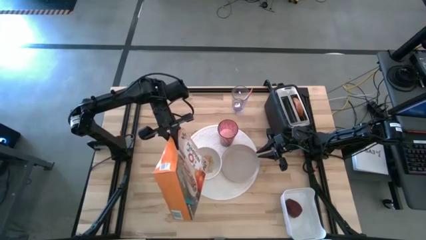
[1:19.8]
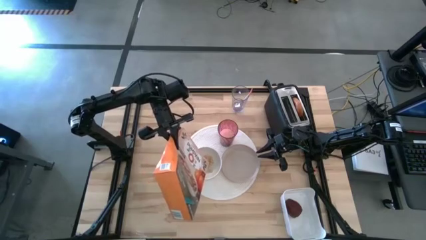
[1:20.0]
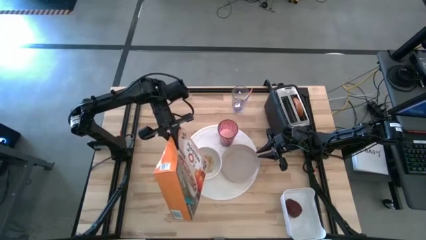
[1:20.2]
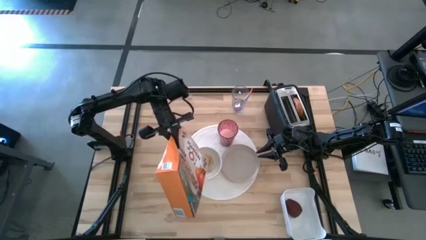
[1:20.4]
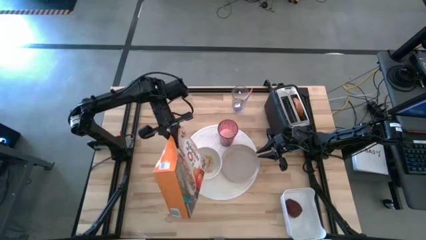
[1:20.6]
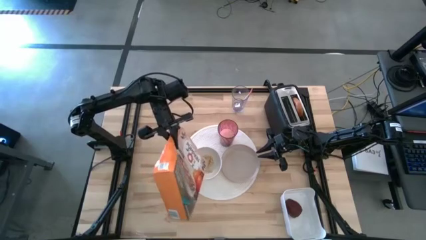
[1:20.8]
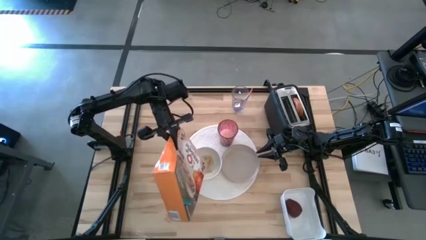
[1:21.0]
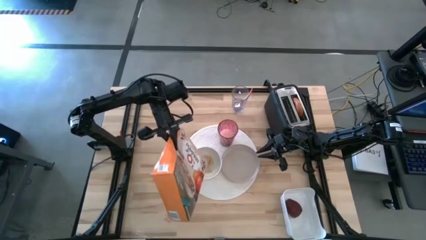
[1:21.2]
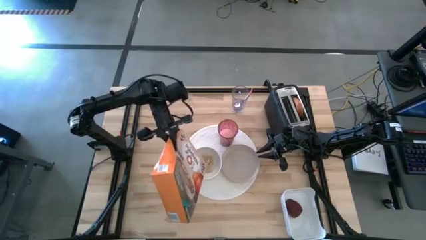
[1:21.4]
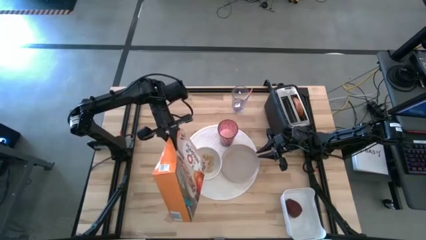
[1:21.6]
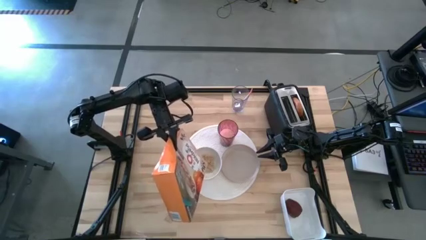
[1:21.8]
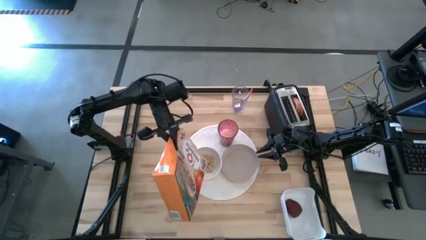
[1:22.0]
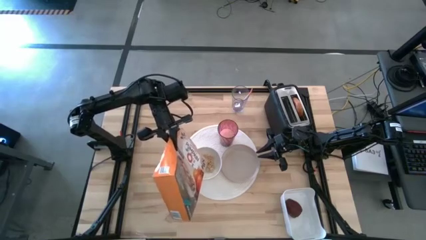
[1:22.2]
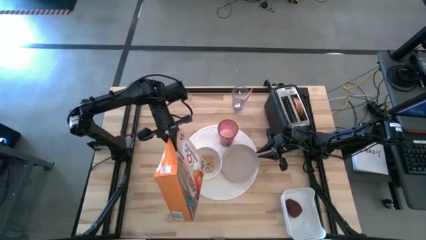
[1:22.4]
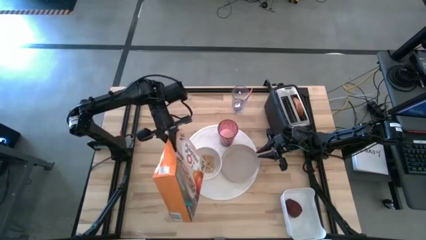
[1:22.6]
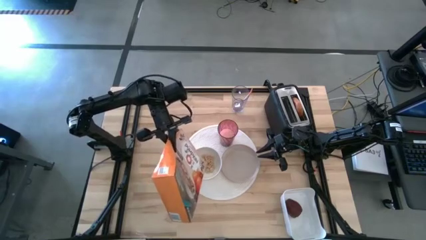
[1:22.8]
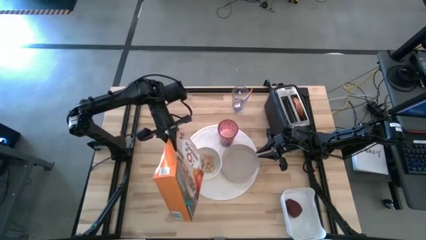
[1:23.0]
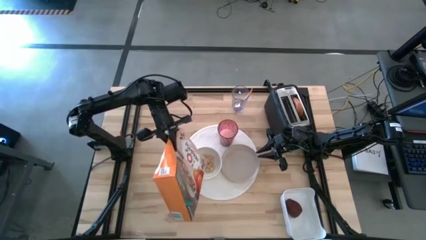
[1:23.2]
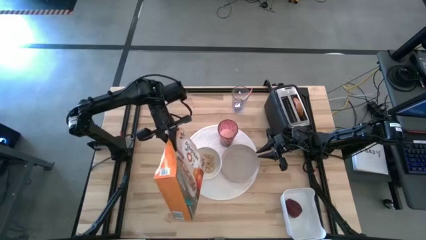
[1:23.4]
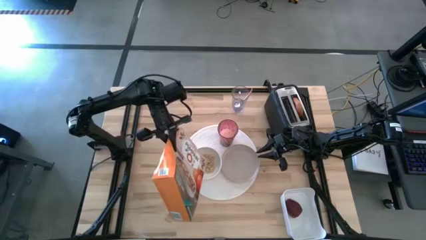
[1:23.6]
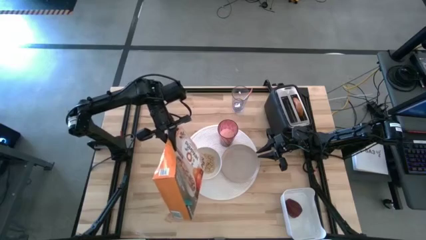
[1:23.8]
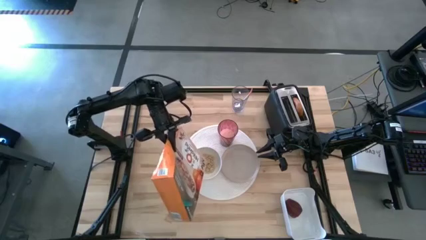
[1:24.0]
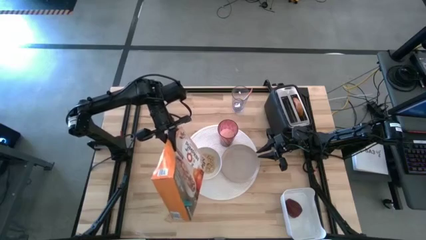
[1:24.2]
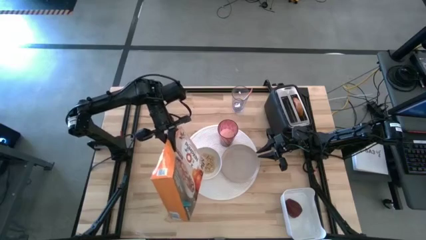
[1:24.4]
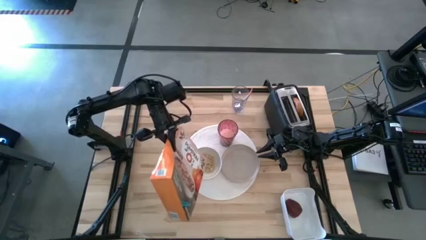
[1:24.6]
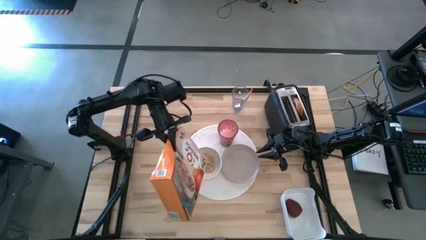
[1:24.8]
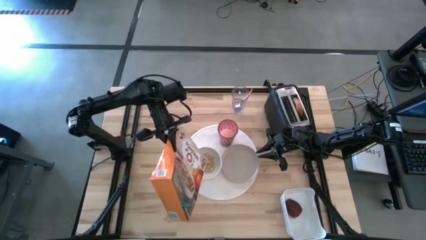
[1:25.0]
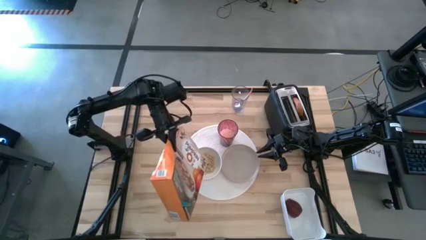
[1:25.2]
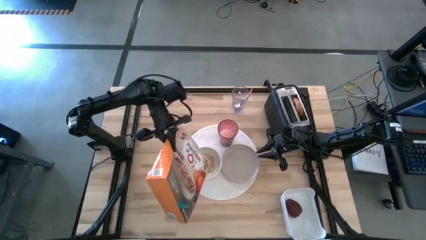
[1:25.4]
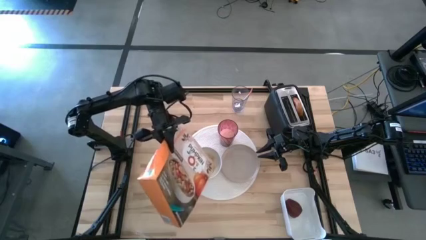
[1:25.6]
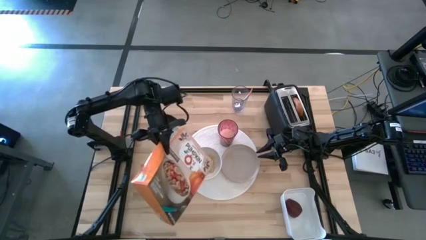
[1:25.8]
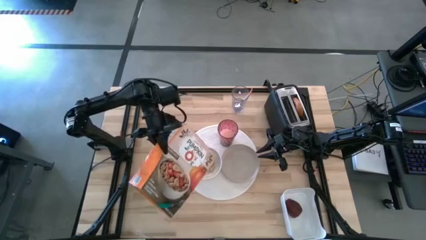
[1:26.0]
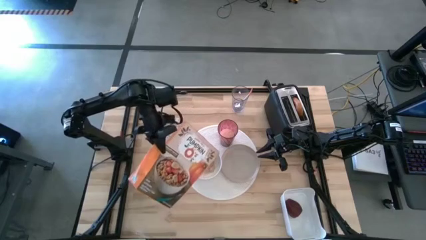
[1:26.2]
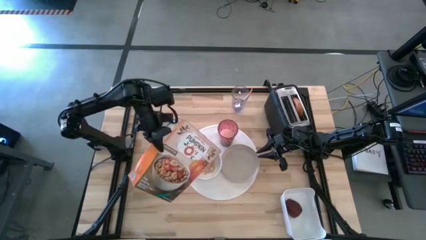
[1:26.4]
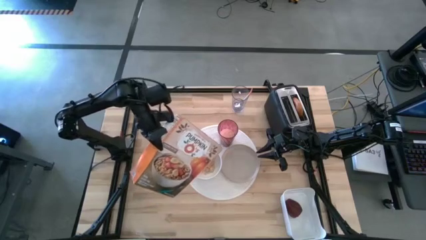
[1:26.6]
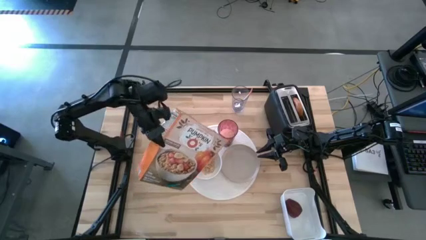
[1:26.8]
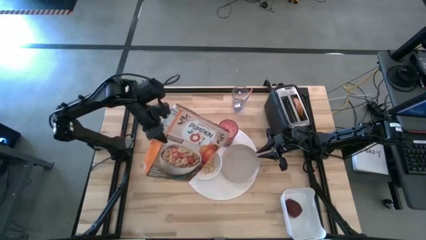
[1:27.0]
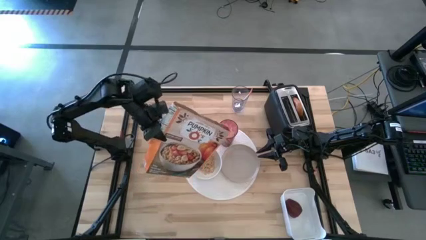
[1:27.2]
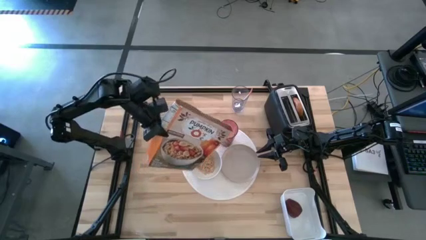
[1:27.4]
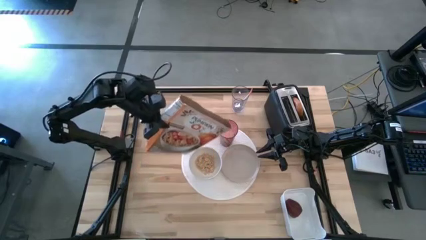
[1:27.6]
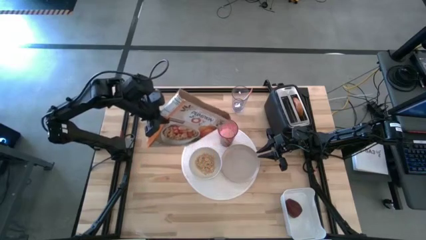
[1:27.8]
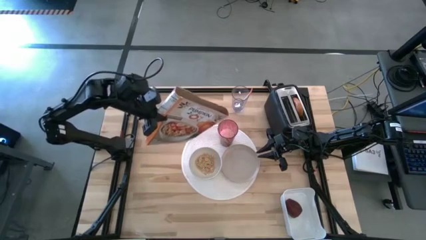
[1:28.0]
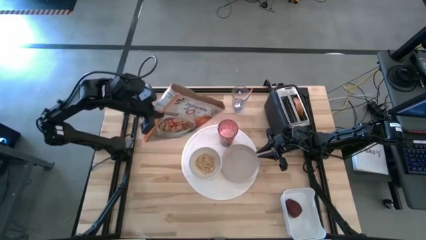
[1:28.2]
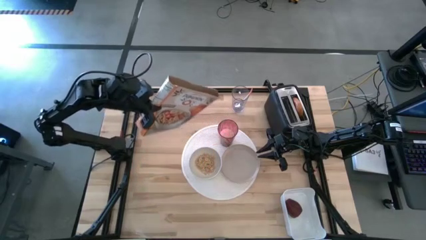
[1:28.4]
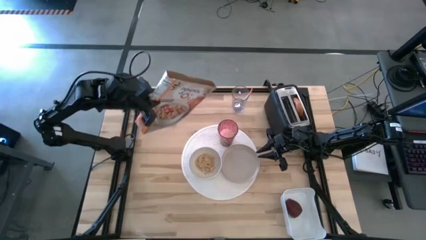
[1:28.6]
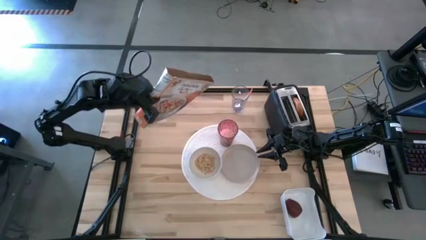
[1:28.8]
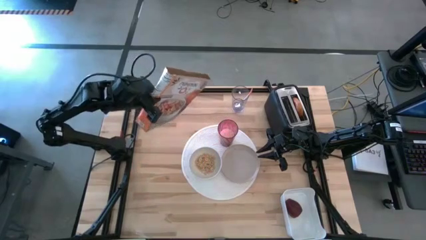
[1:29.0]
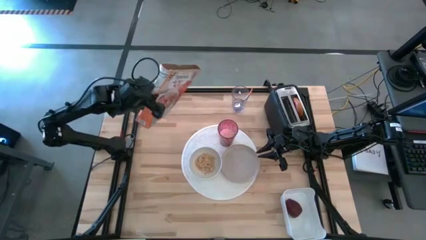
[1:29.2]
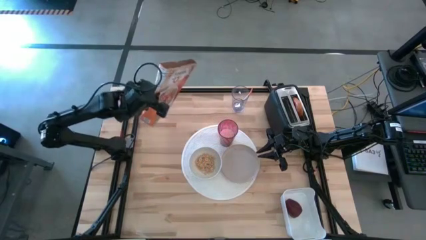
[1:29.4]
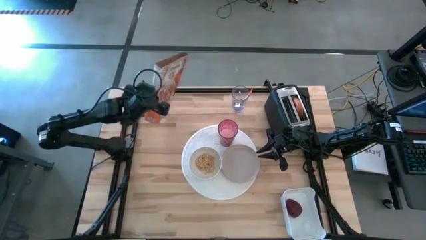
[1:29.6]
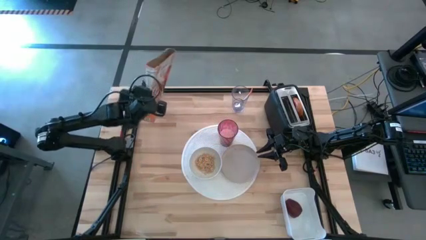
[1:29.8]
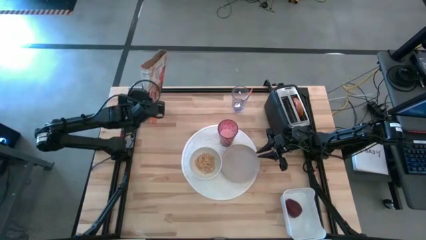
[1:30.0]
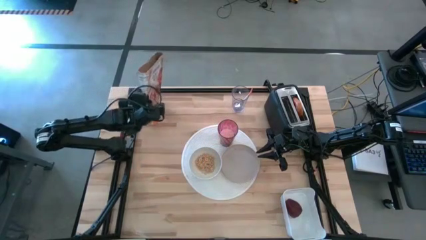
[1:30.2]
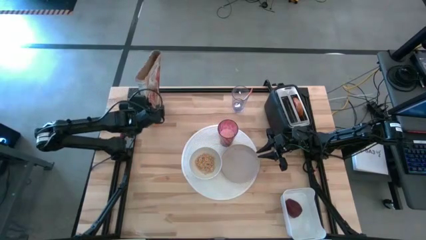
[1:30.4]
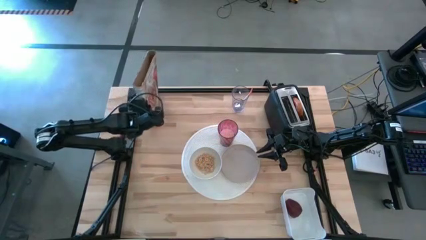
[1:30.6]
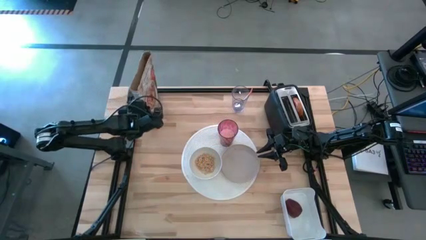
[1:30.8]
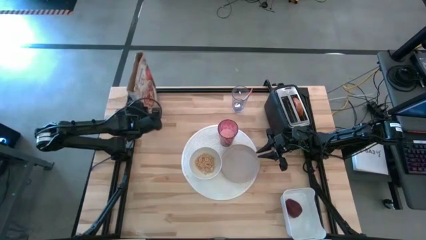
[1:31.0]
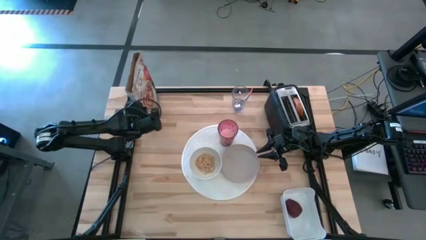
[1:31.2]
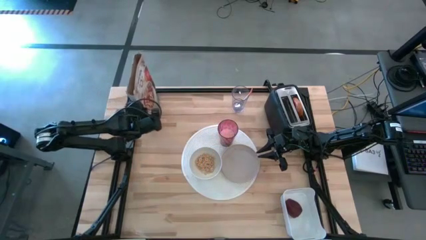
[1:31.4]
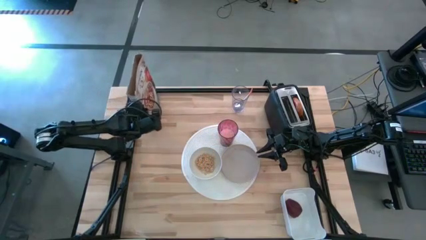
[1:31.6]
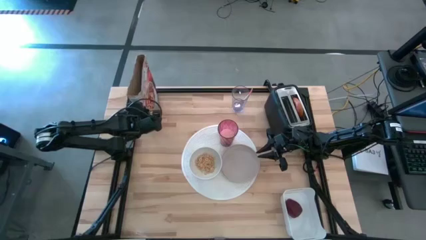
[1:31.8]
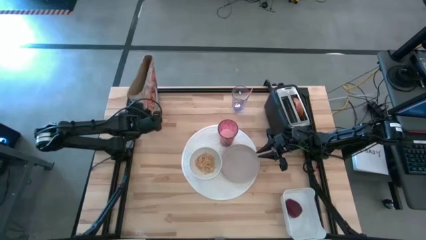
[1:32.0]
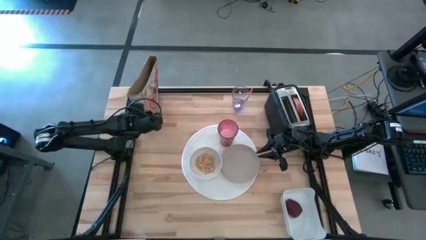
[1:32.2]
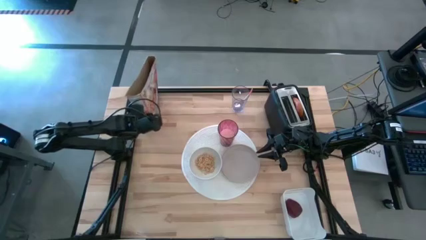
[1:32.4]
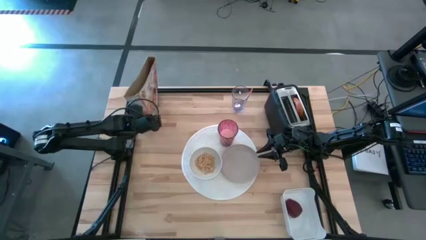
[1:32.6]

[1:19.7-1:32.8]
Task: Arrange a breakfast setting
Pour the cereal from the cereal box into the white bowl

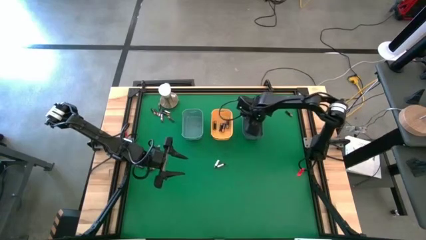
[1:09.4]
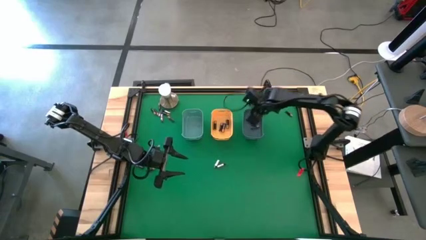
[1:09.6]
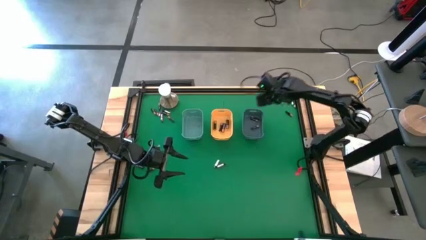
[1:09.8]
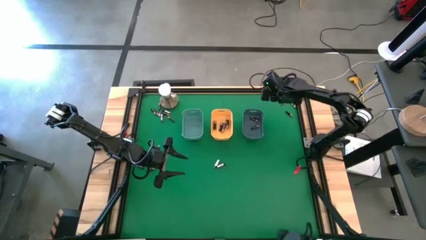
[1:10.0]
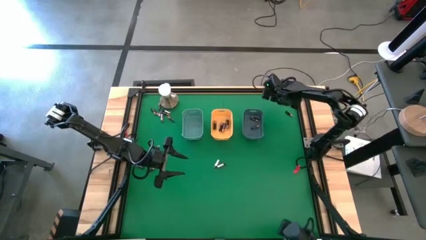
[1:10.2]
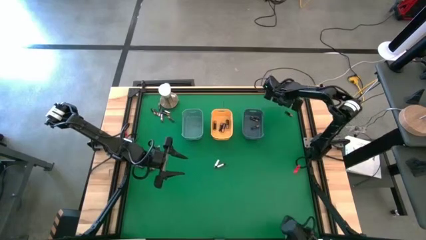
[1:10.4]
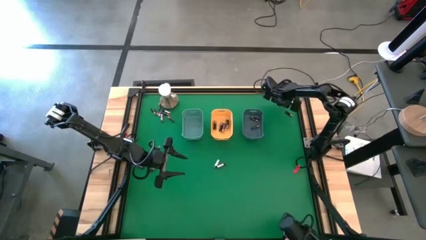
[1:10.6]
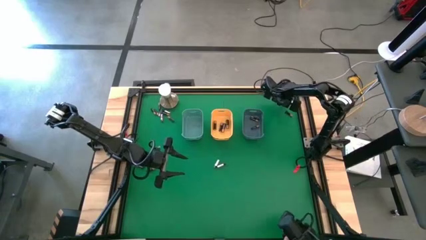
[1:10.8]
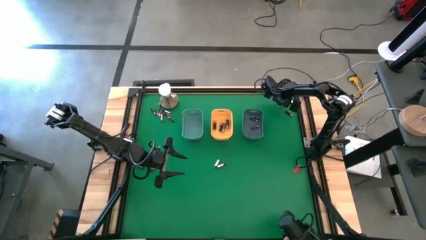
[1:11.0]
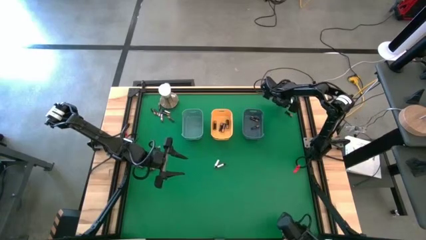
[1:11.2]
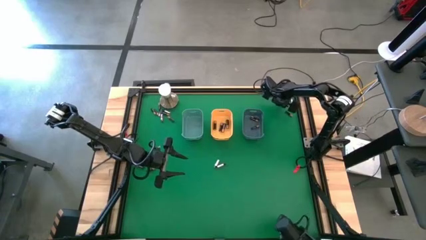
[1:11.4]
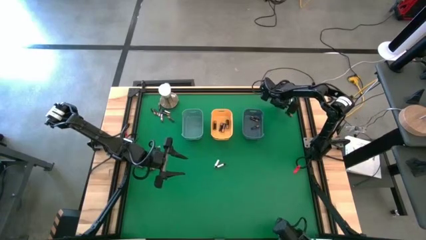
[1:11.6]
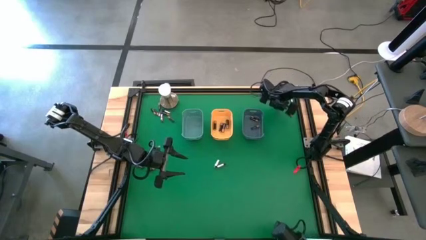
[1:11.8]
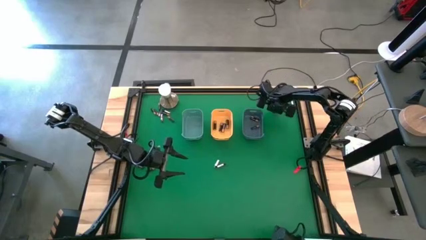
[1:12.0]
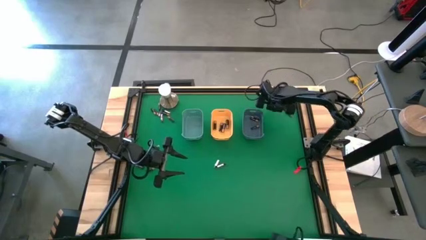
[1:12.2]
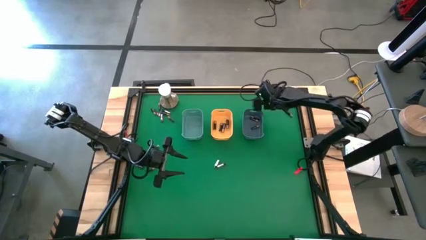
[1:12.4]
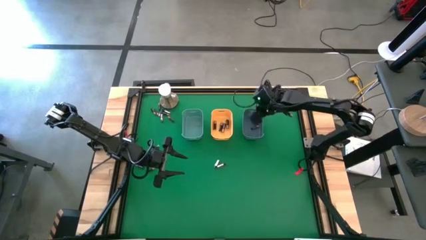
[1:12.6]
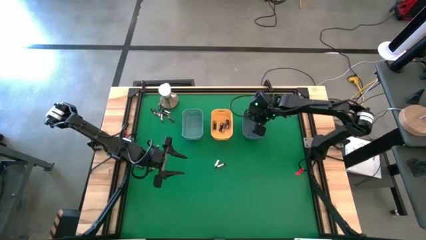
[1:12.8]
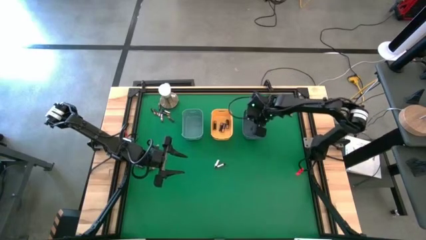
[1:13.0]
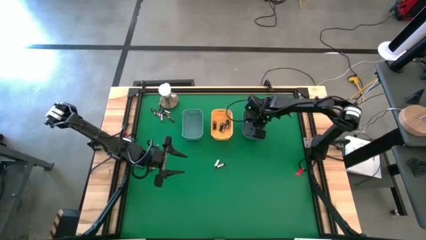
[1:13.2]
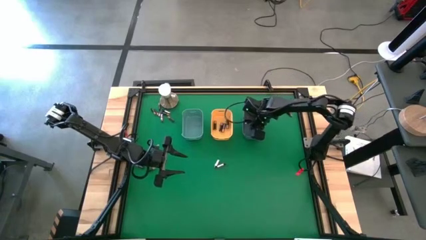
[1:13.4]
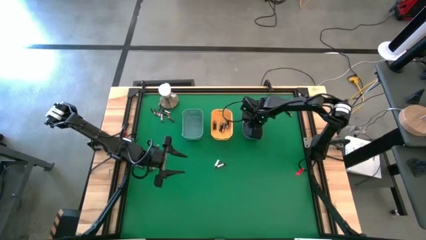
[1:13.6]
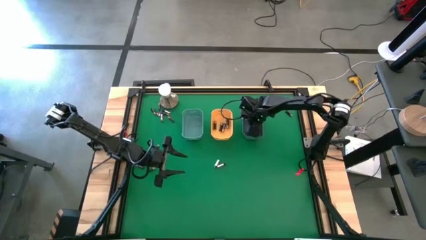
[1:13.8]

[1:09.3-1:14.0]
Task: Sort batteries
Put the black battery into the blue bin
